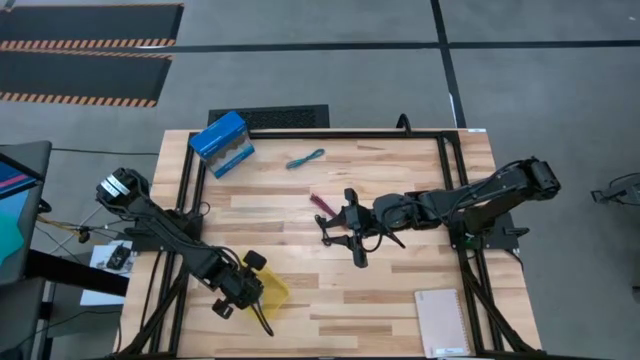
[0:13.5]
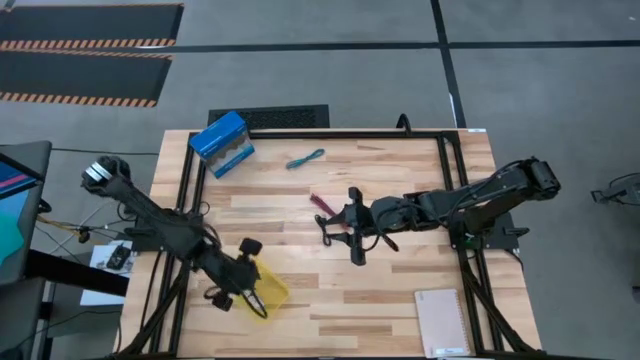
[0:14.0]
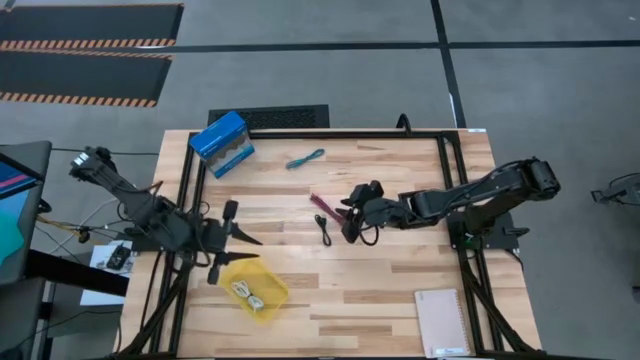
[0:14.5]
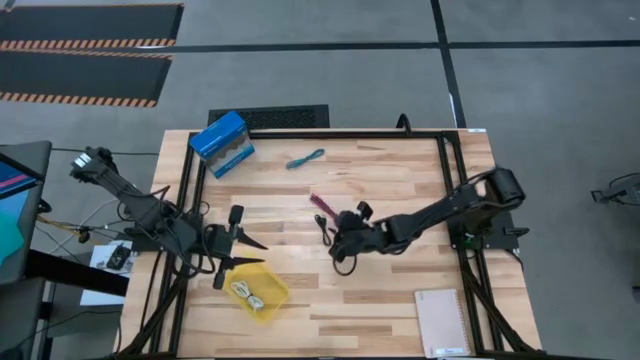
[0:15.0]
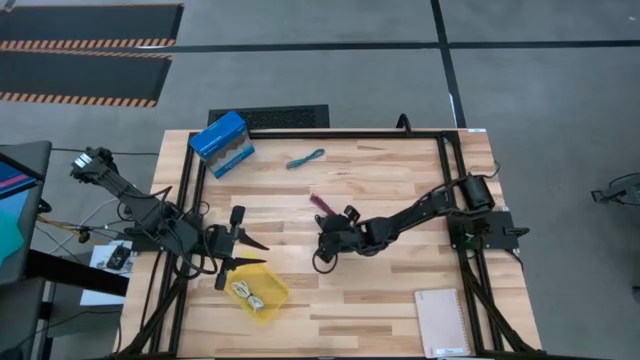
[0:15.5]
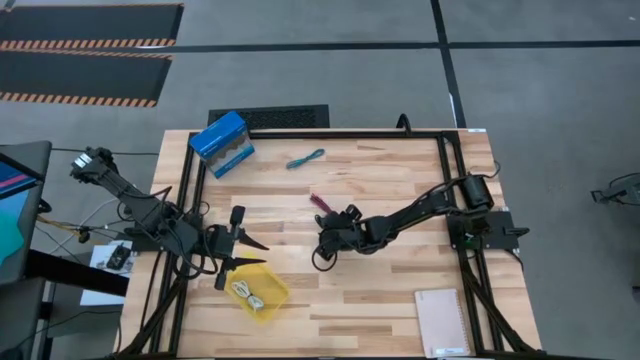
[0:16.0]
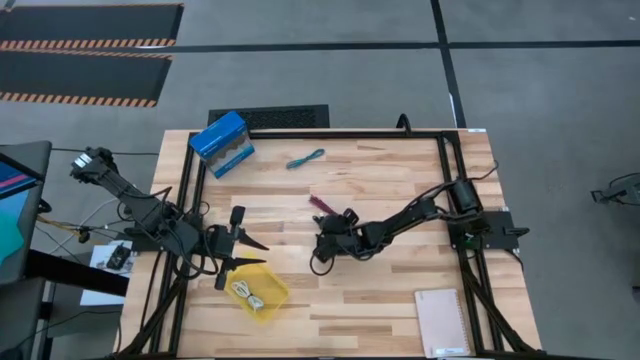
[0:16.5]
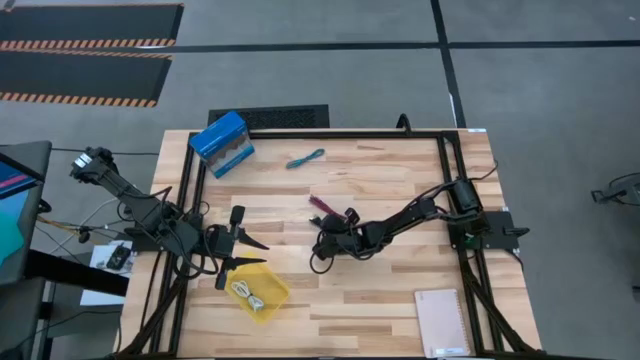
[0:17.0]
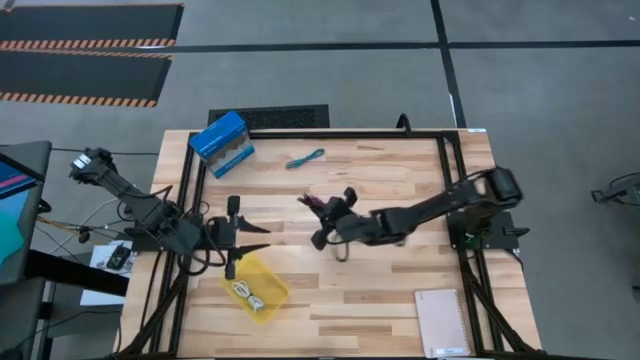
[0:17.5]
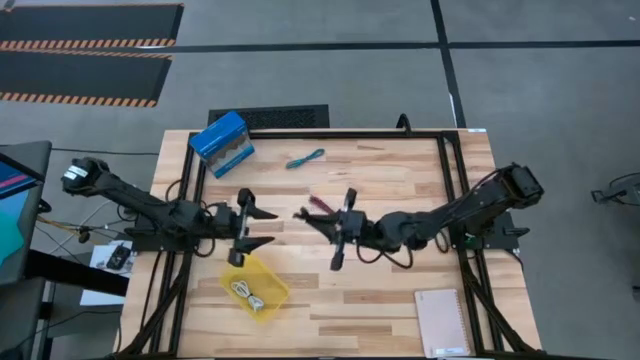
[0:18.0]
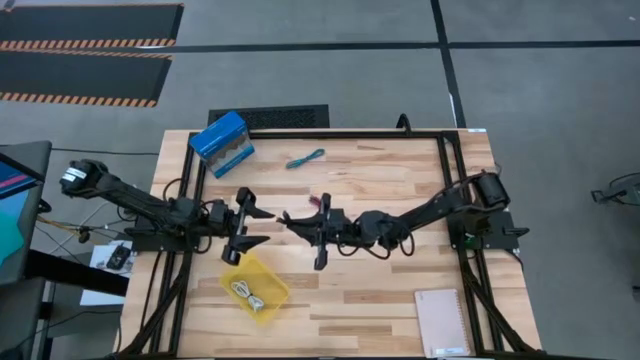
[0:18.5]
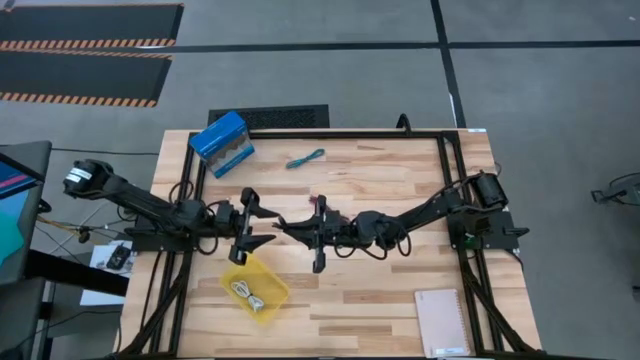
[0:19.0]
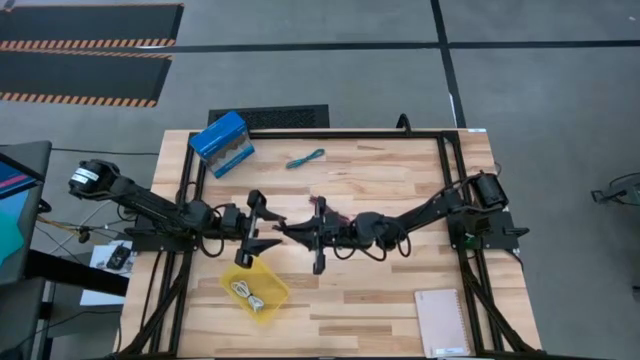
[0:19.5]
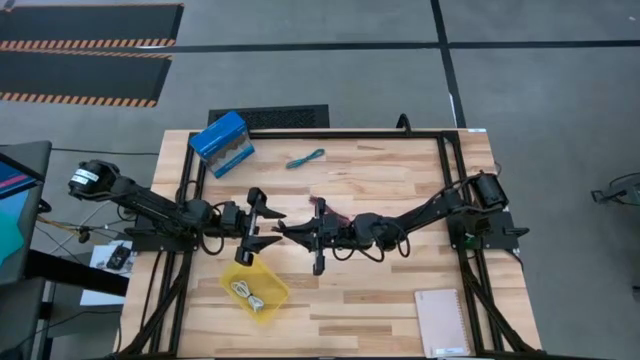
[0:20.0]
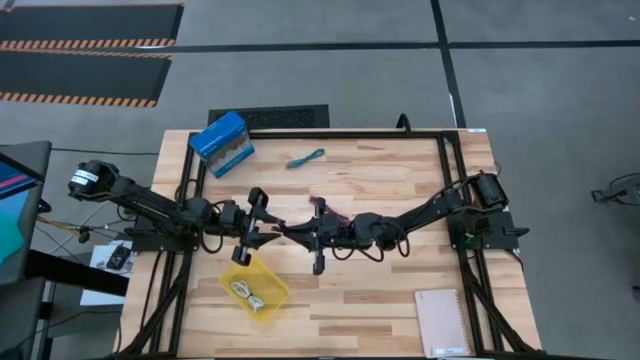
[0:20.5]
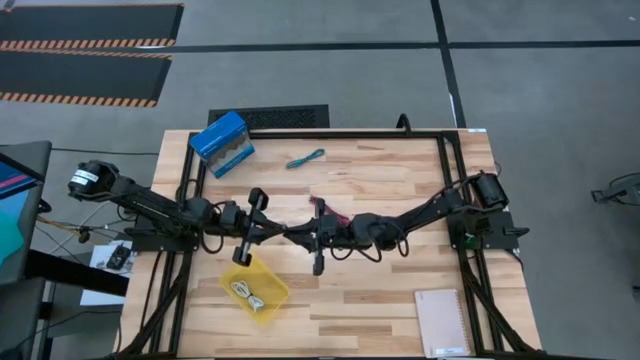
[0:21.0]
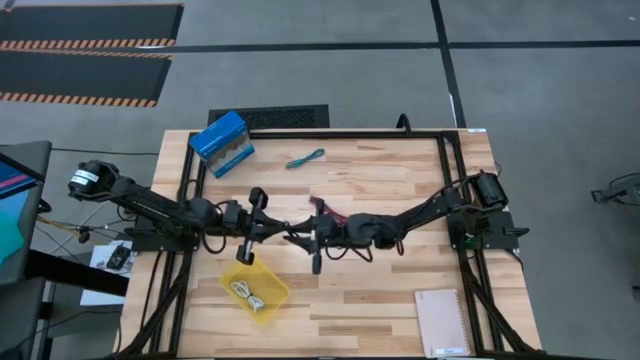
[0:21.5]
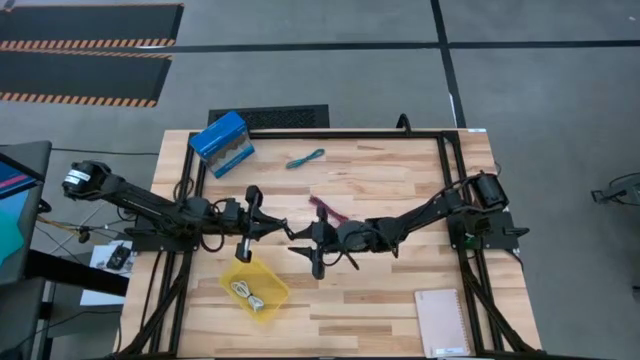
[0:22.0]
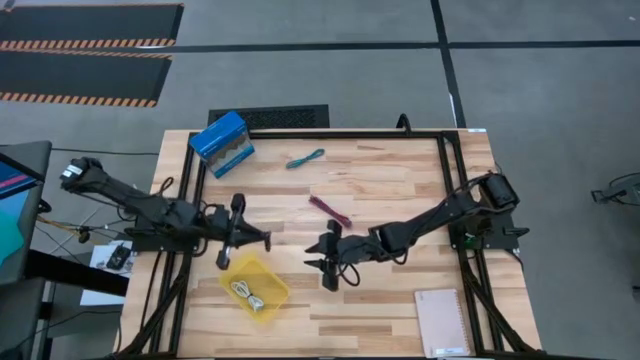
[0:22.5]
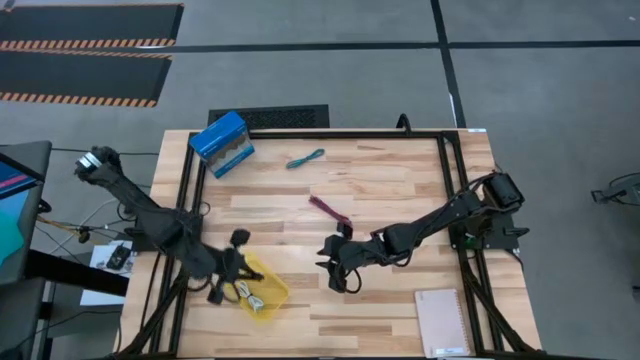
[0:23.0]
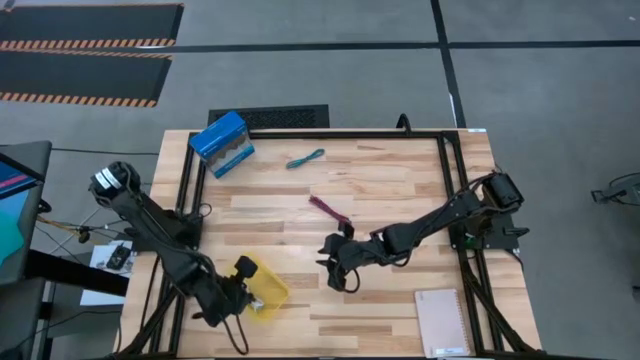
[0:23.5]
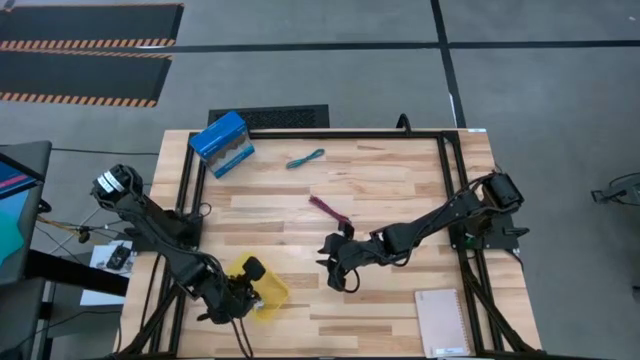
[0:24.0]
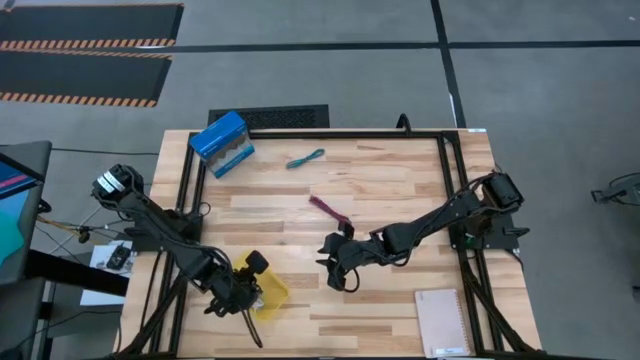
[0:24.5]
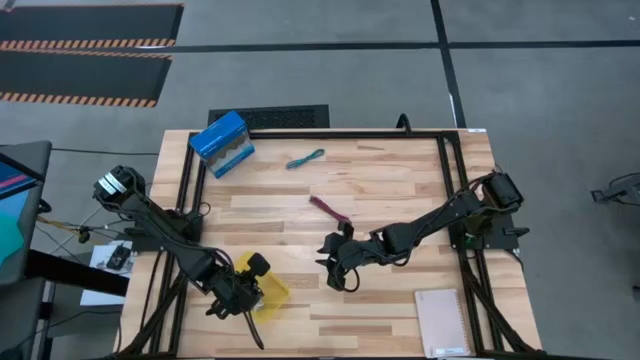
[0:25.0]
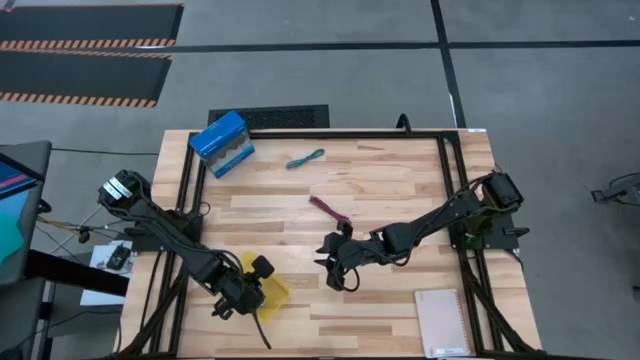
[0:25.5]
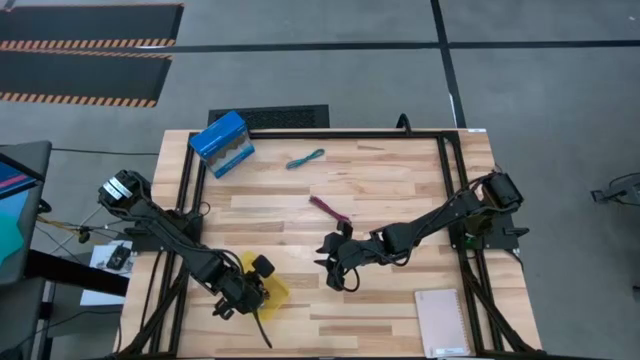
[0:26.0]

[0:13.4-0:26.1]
Task: Pick and place USB-C Cables
Put the black charger cable into the yellow bin

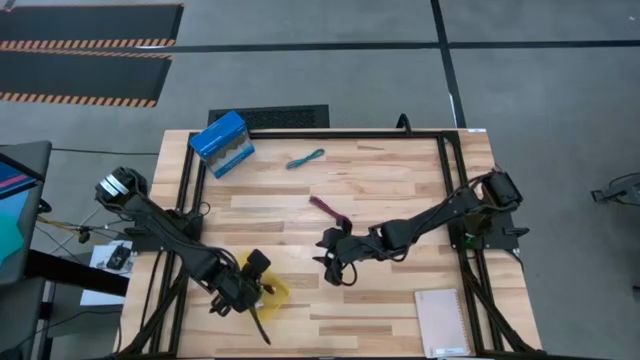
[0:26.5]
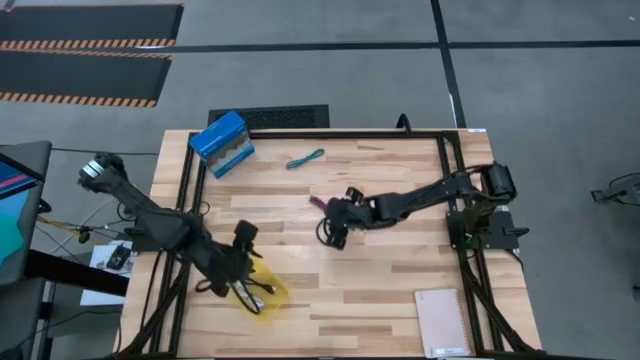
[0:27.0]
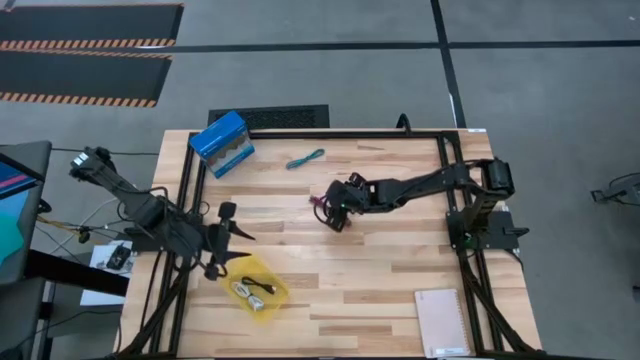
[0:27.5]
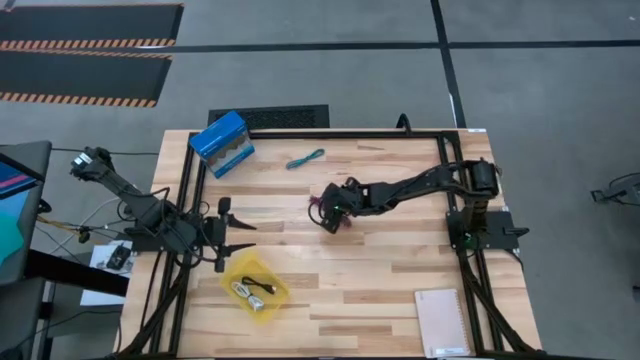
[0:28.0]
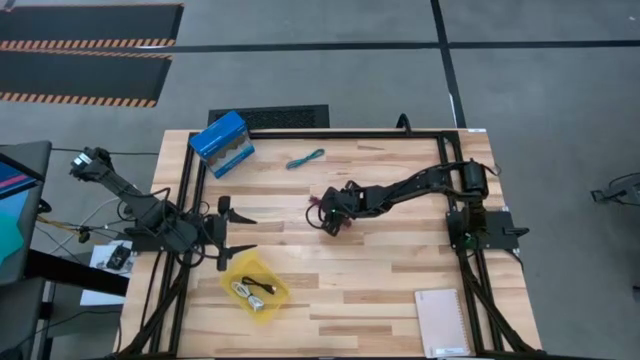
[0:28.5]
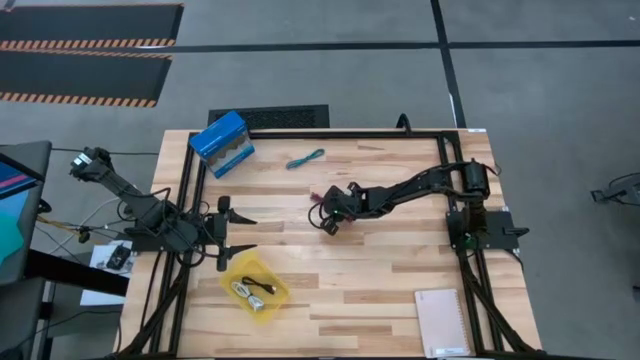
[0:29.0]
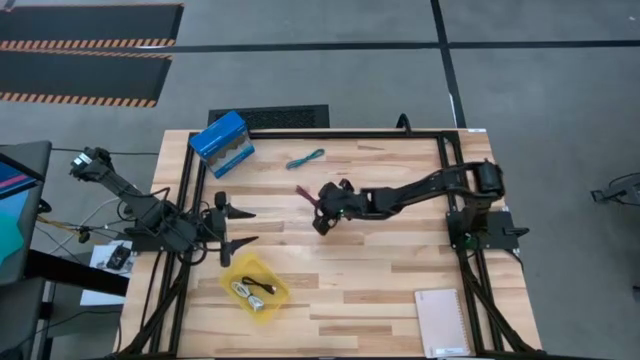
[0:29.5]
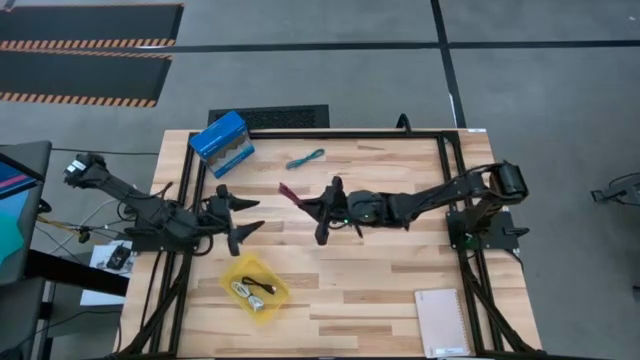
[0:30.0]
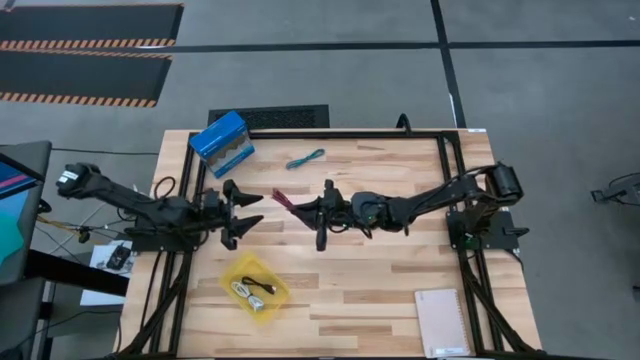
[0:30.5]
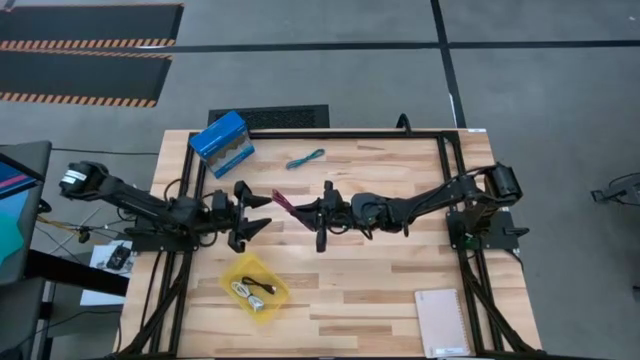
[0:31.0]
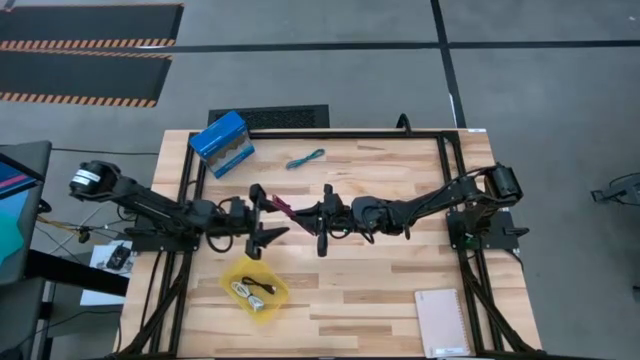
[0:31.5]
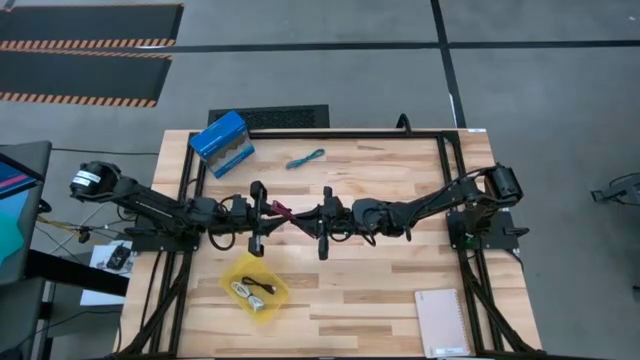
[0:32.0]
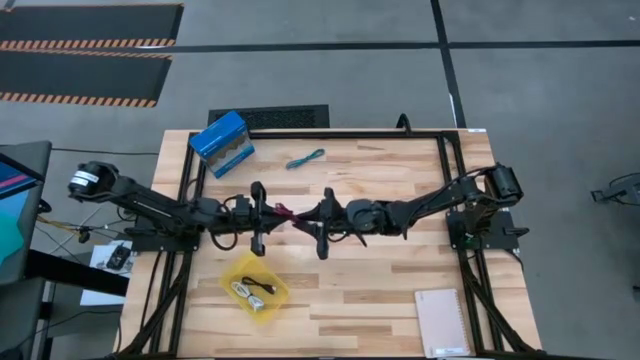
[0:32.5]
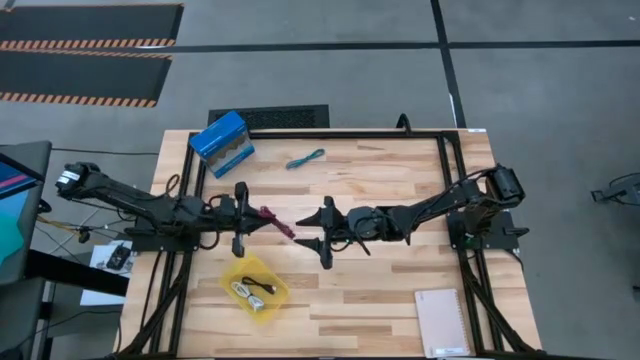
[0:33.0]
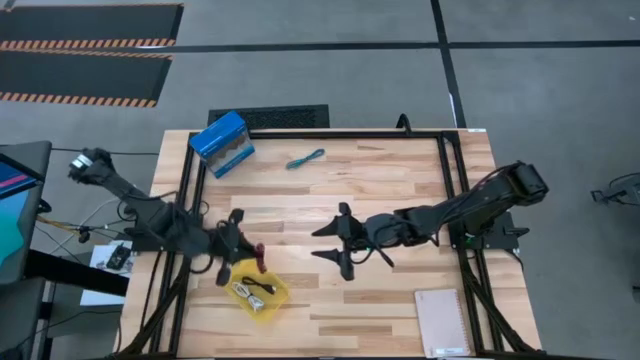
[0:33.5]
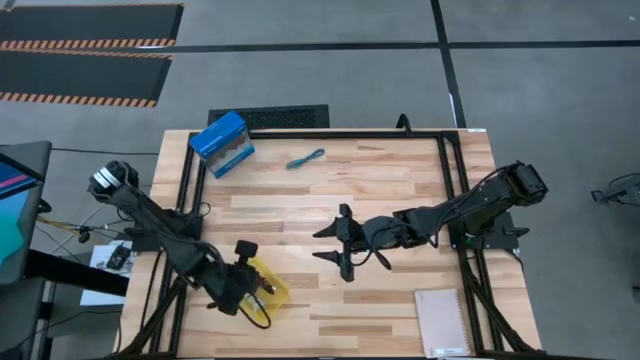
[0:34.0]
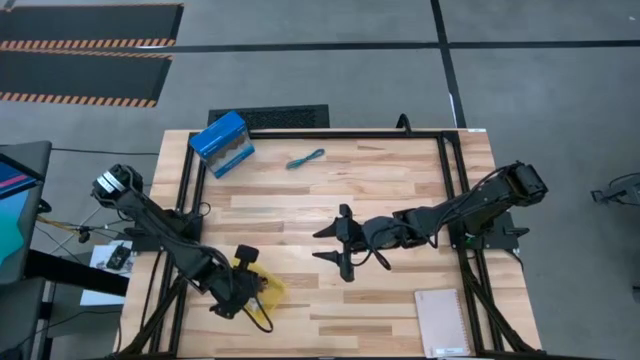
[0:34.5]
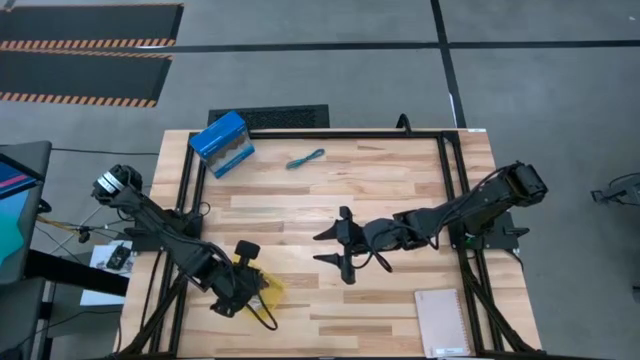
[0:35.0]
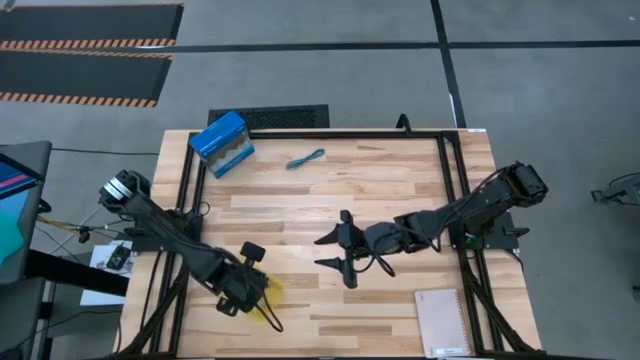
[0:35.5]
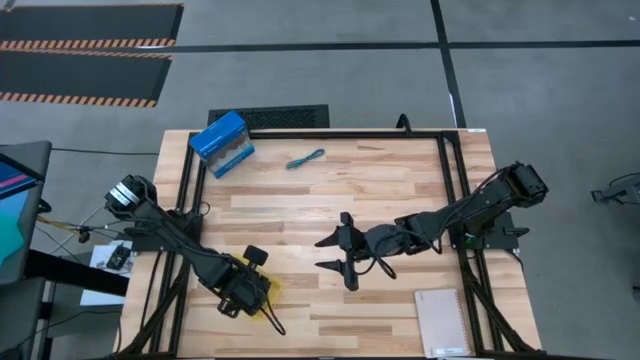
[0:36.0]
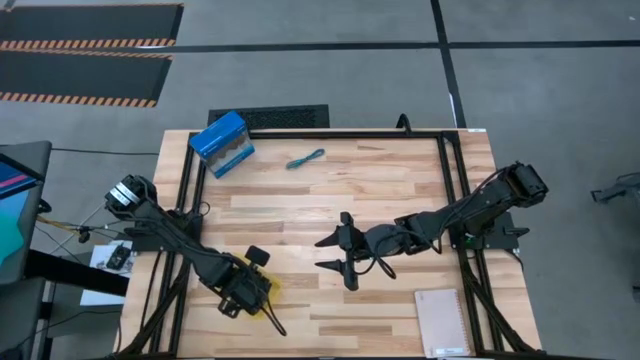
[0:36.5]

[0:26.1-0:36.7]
Put the pink charger cable into the yellow bin
